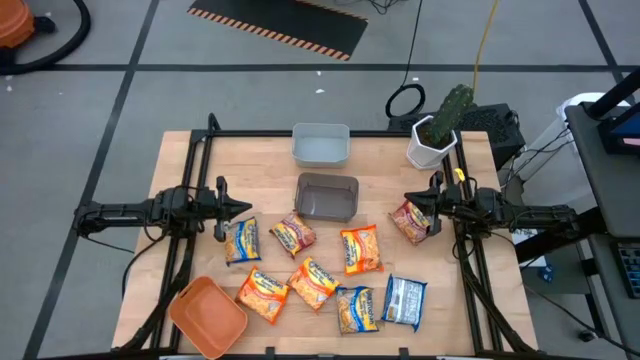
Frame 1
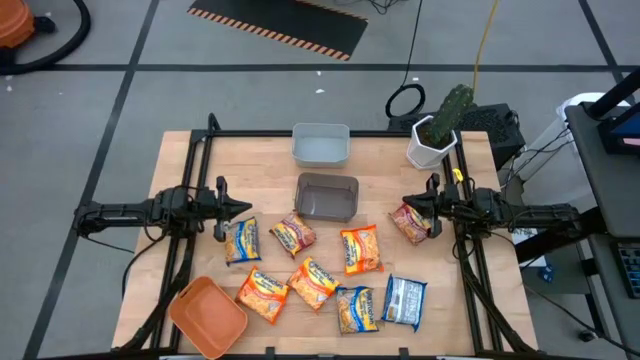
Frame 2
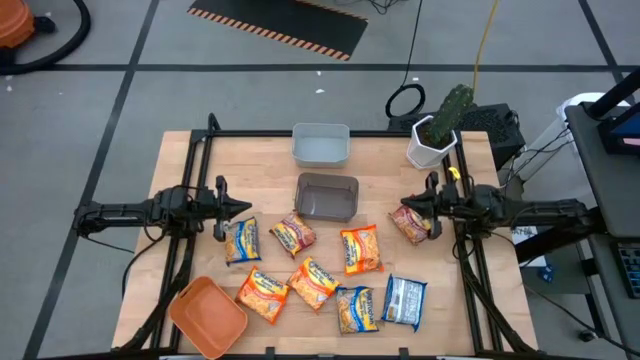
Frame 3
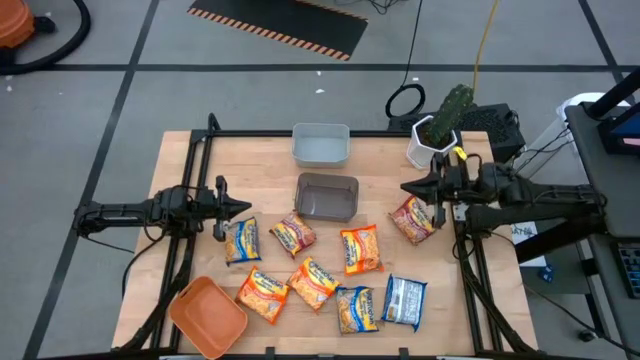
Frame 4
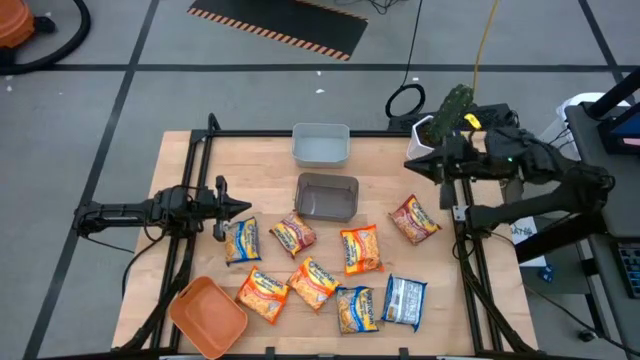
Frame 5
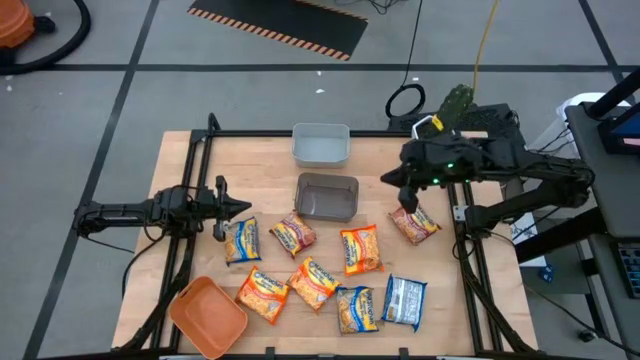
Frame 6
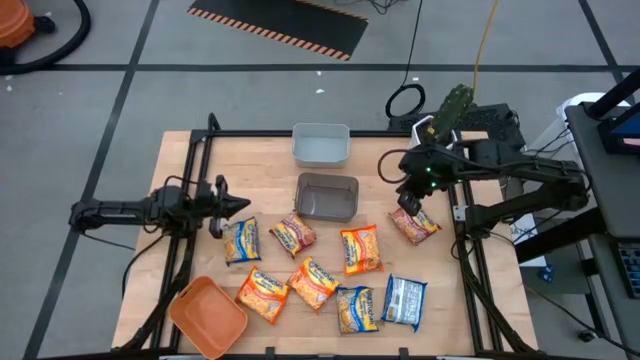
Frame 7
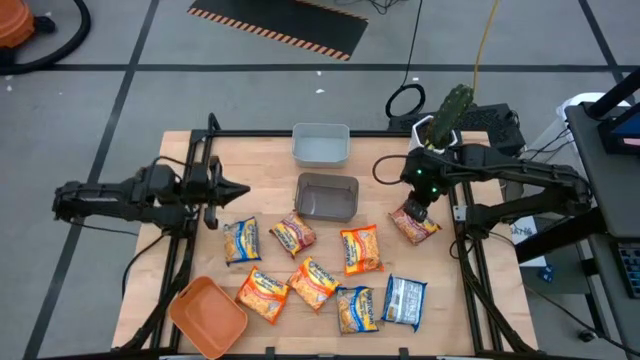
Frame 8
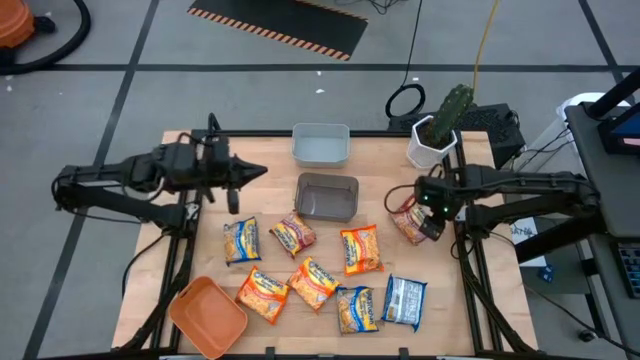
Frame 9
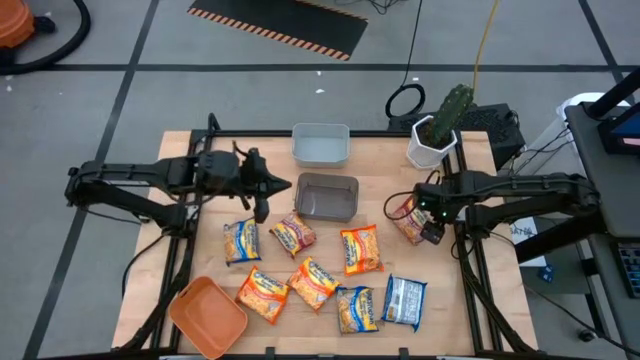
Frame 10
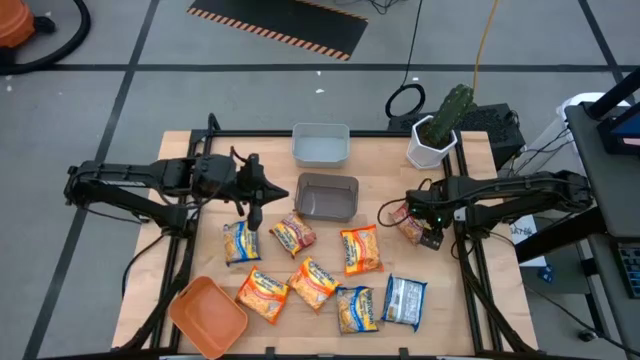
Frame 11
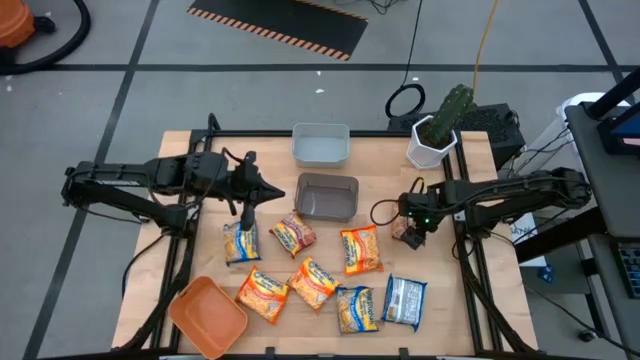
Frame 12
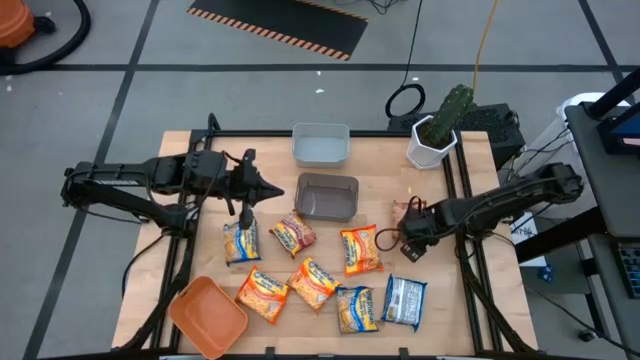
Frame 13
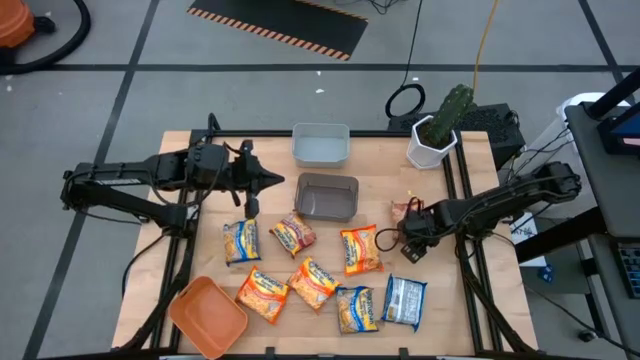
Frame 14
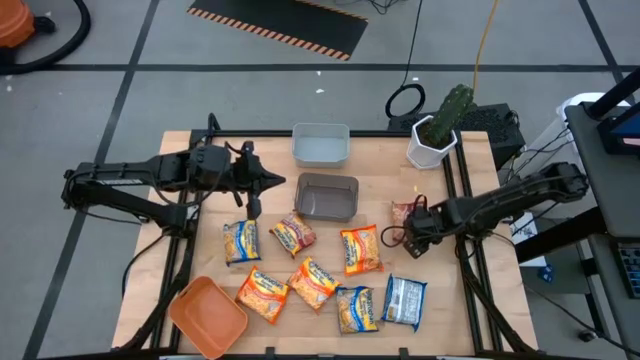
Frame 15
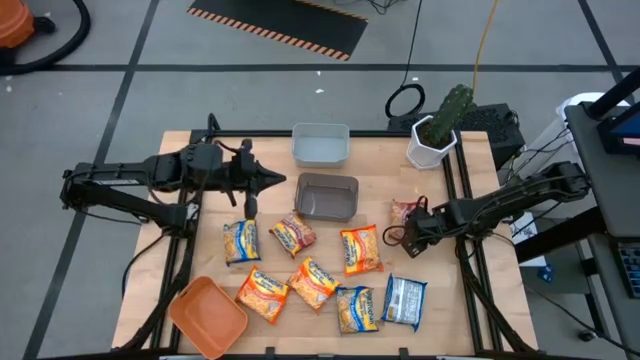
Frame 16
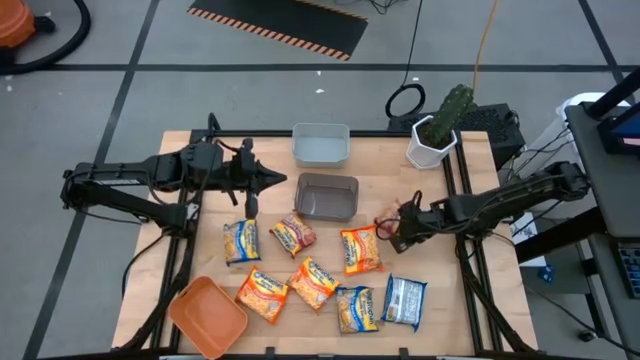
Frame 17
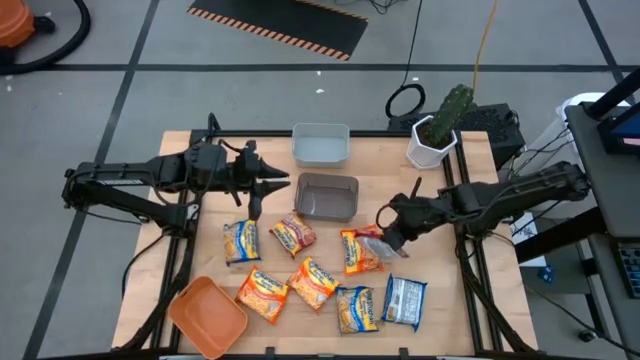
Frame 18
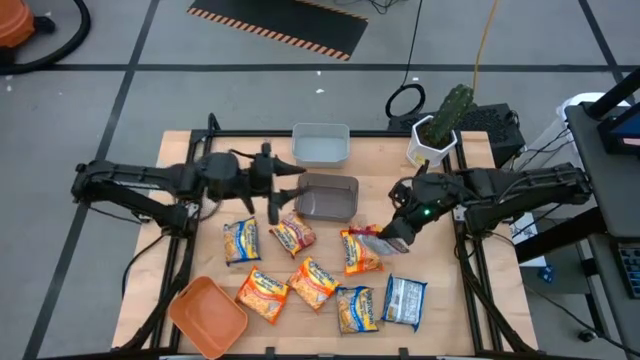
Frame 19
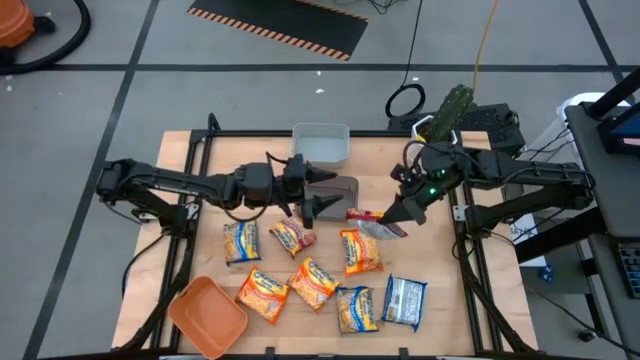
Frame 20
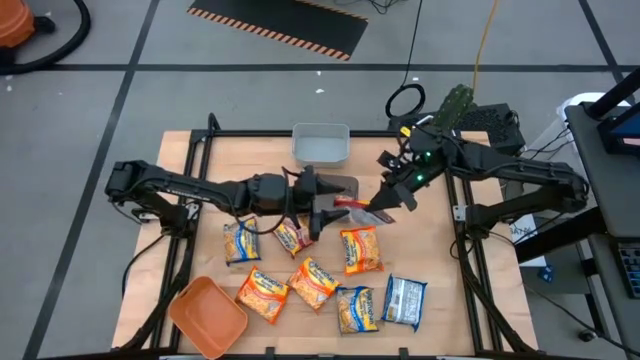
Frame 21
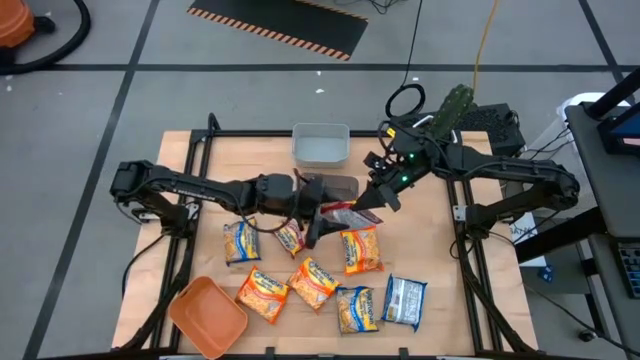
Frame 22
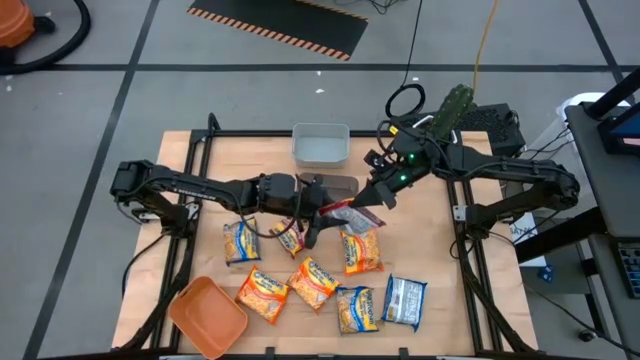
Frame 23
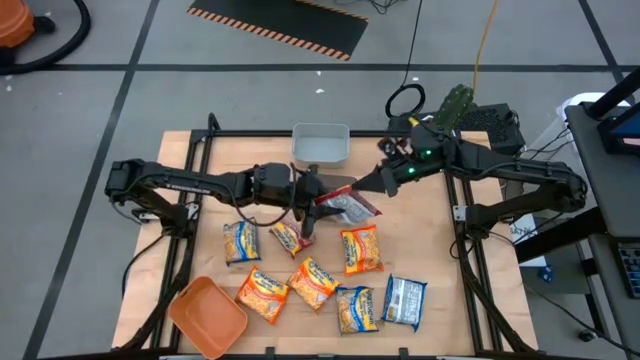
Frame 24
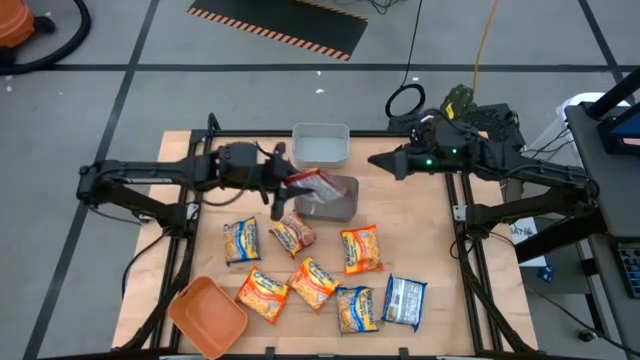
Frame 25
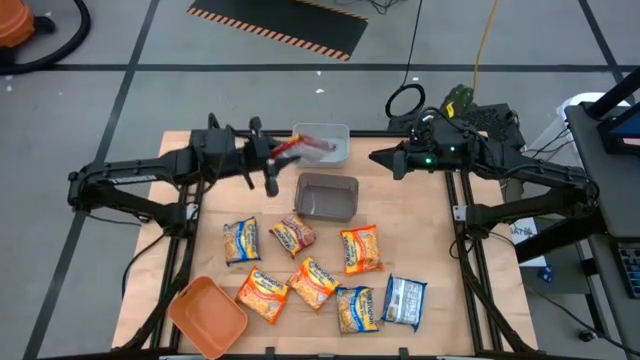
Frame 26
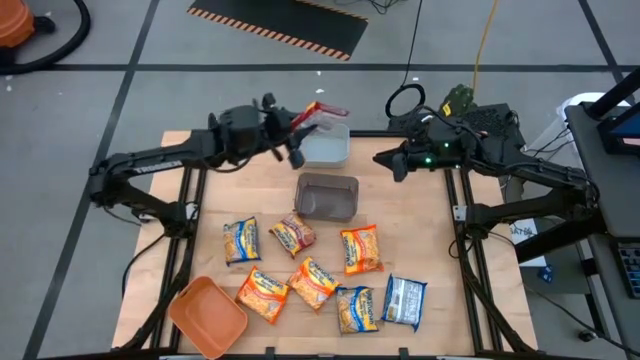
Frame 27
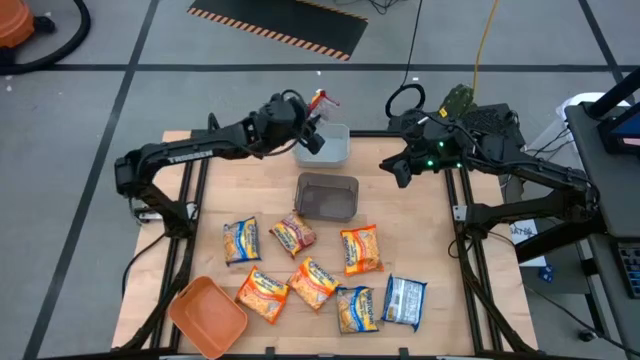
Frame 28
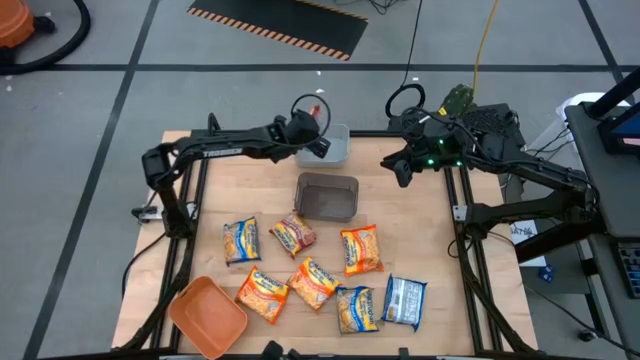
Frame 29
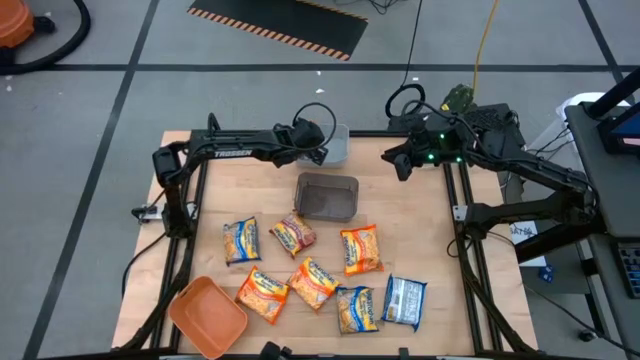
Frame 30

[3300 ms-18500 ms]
Task: Sort Maruchan noodles
Put the right red noodle pack into the gray bin

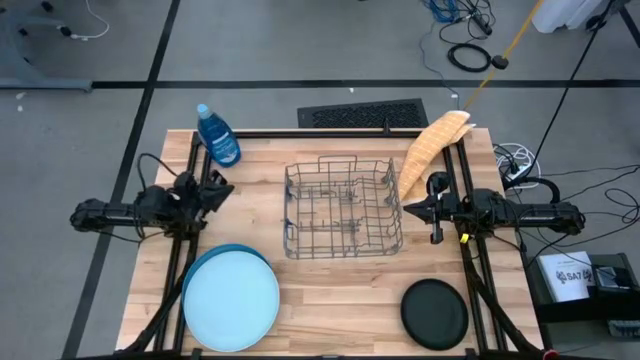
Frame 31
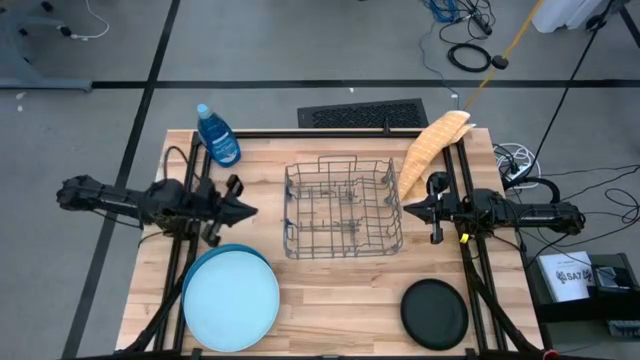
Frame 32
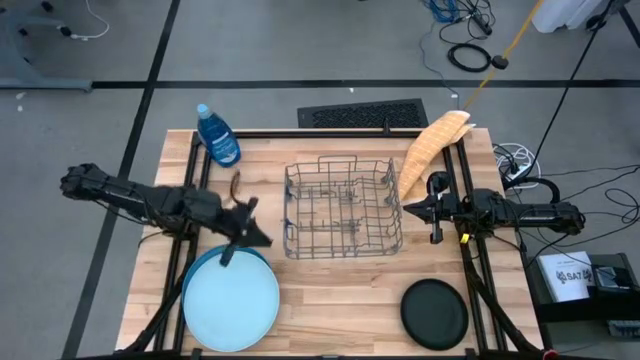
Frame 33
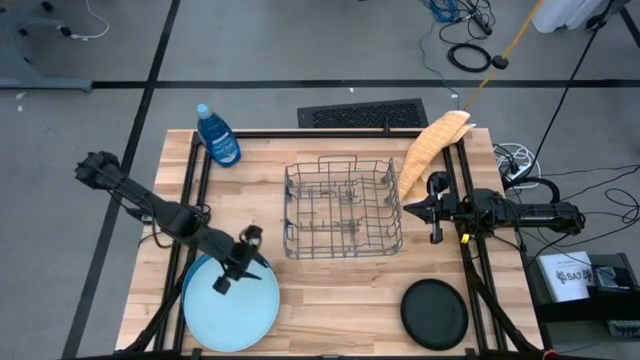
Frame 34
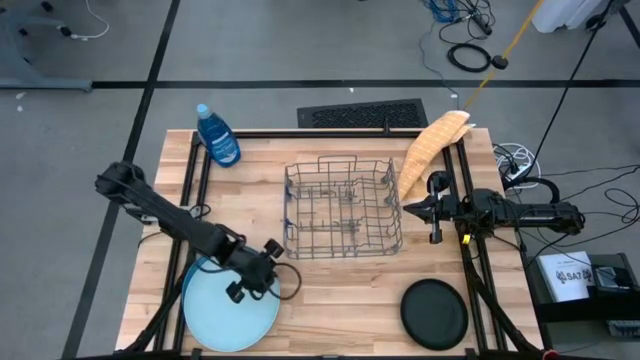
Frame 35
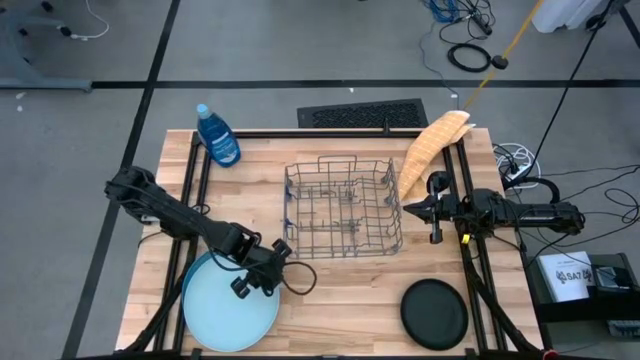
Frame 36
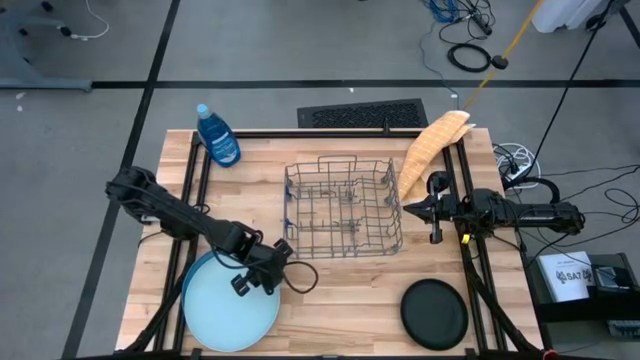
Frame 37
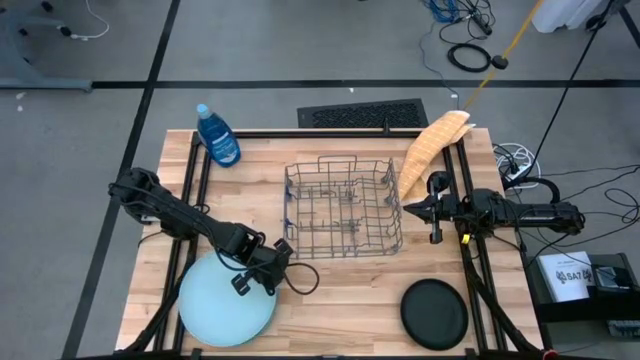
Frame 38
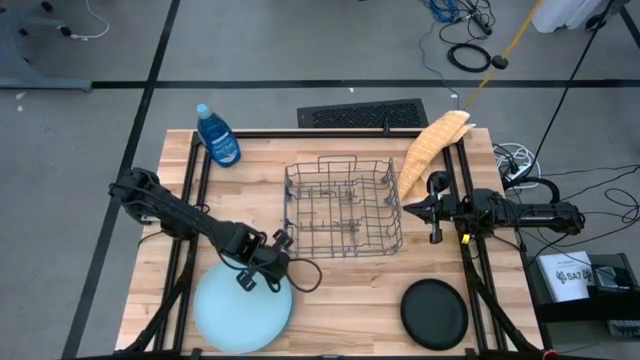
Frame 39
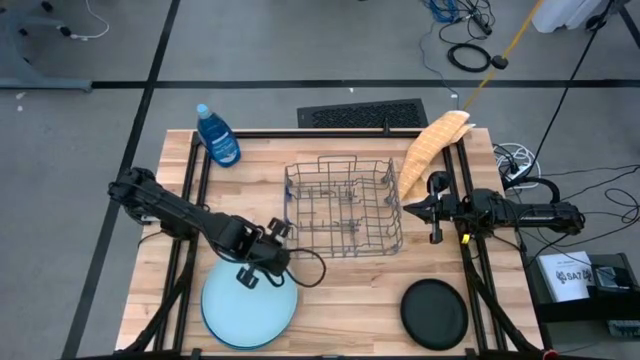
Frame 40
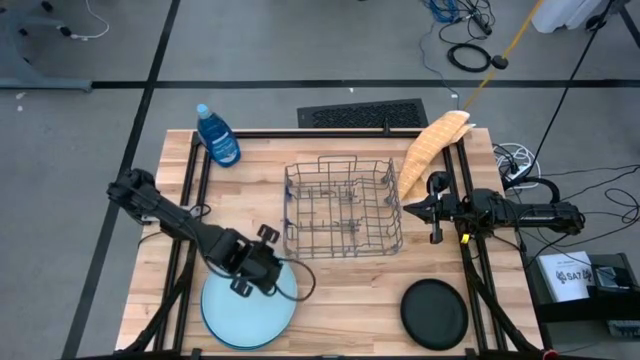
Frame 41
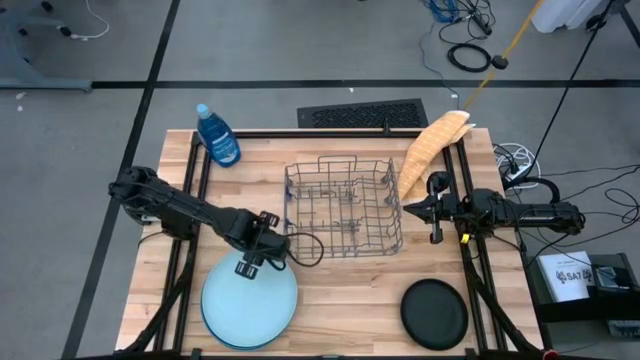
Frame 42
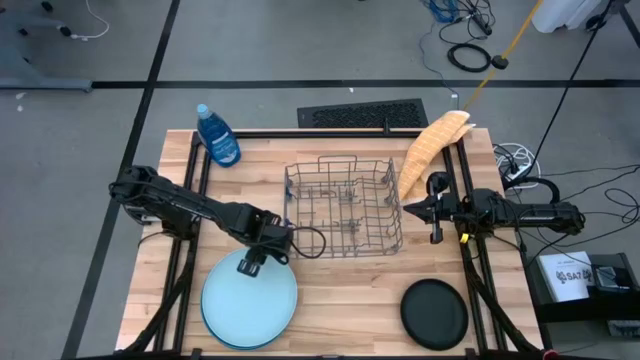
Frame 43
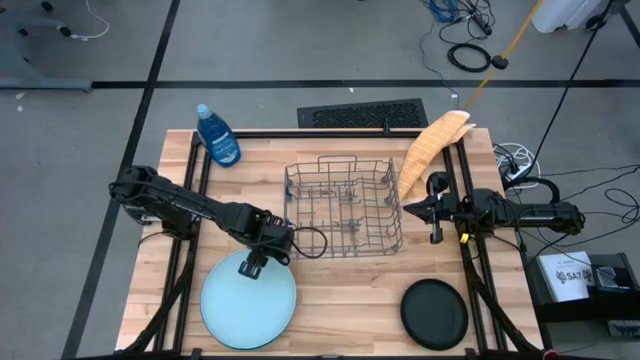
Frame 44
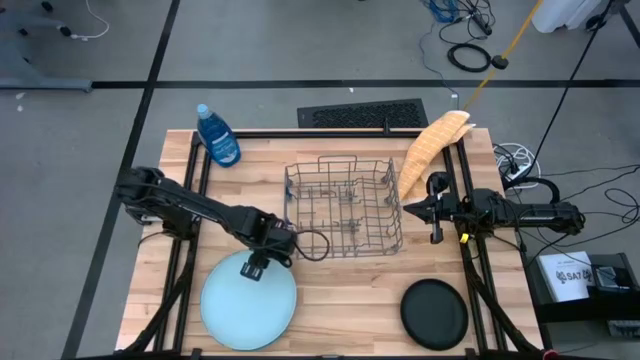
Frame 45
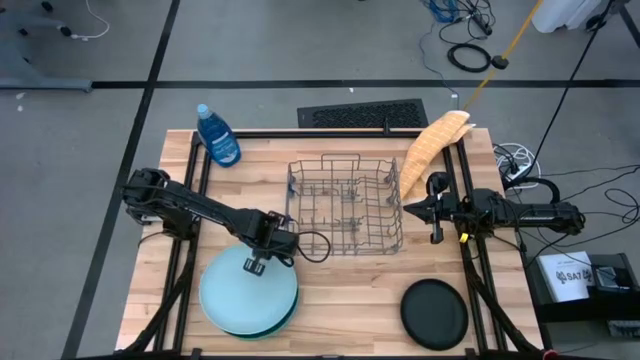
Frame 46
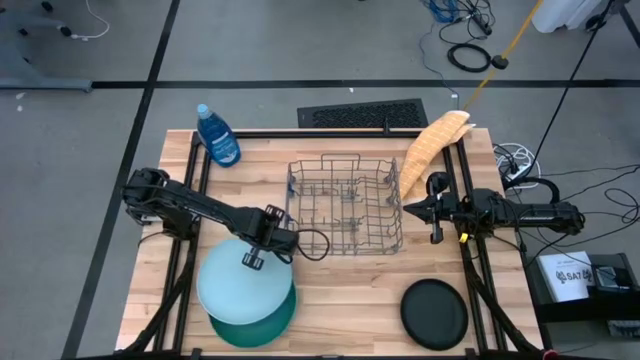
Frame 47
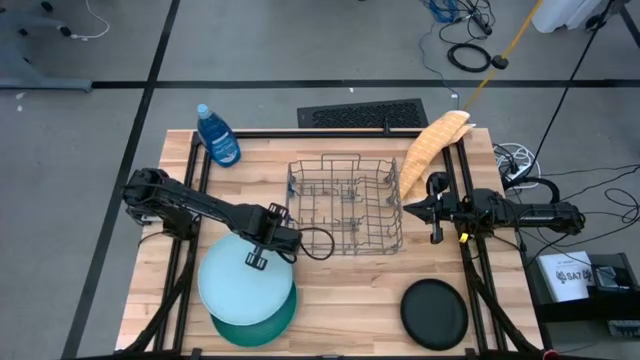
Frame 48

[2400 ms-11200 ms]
Task: Sort dishes
Put the light blue plate into the dish rack
